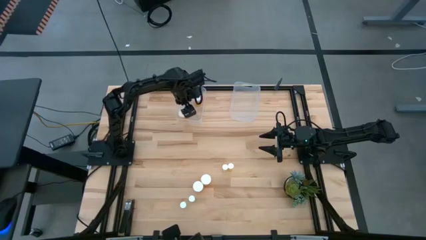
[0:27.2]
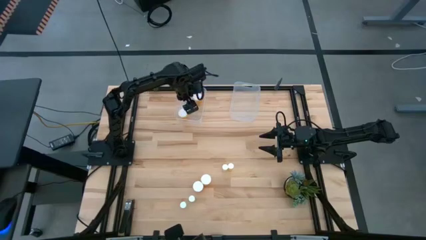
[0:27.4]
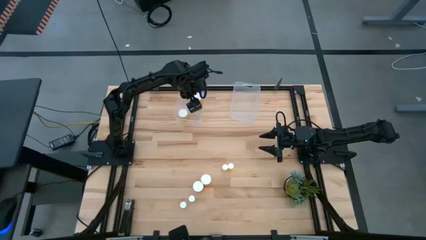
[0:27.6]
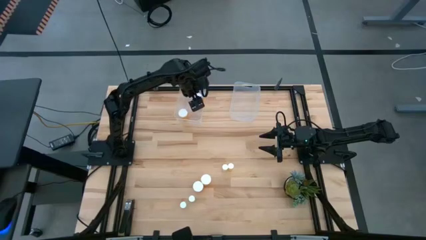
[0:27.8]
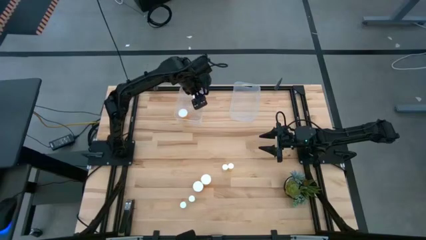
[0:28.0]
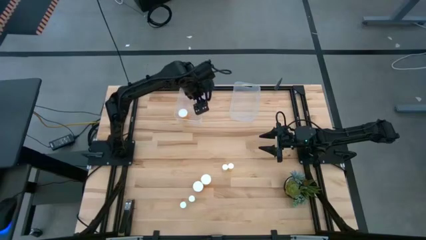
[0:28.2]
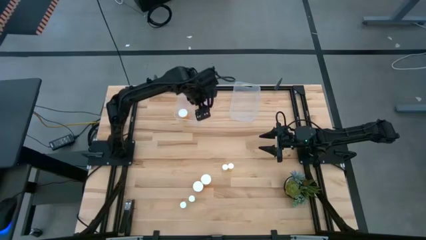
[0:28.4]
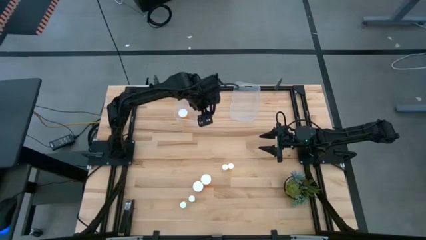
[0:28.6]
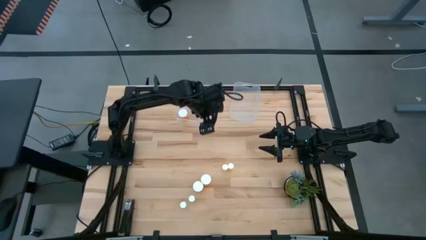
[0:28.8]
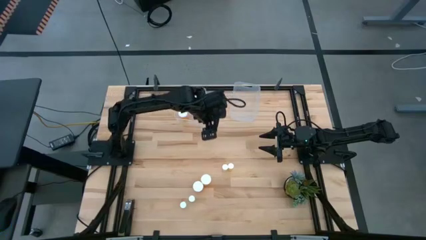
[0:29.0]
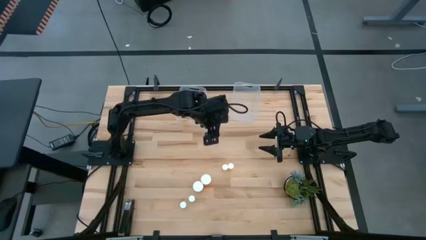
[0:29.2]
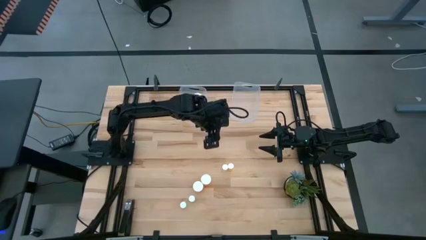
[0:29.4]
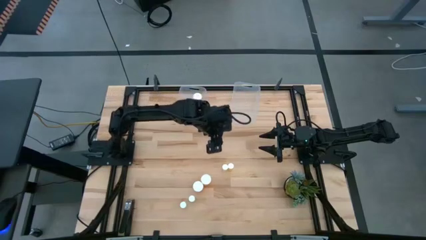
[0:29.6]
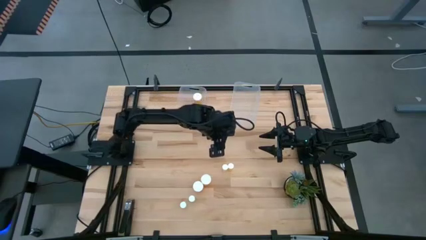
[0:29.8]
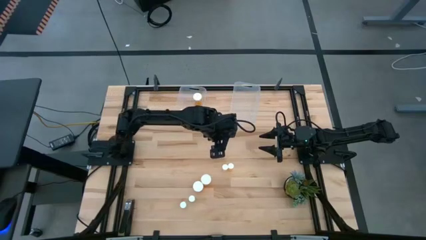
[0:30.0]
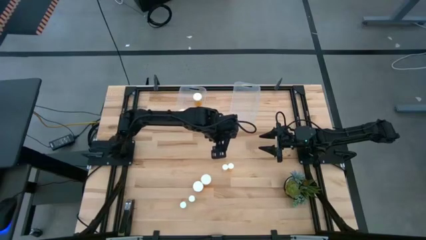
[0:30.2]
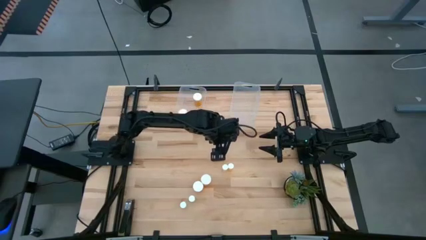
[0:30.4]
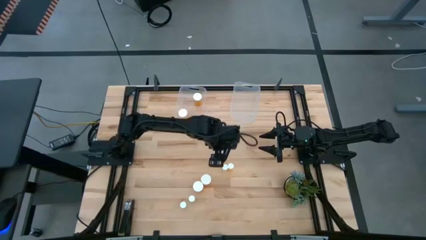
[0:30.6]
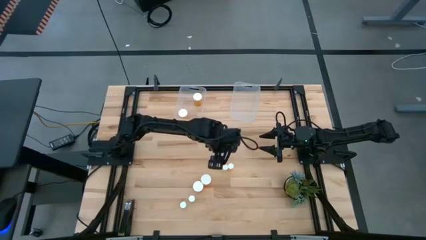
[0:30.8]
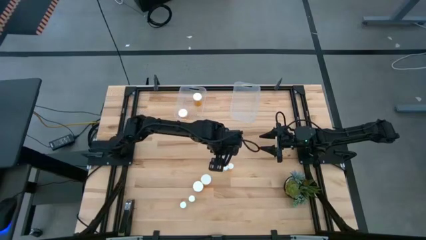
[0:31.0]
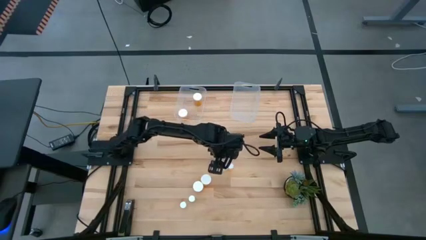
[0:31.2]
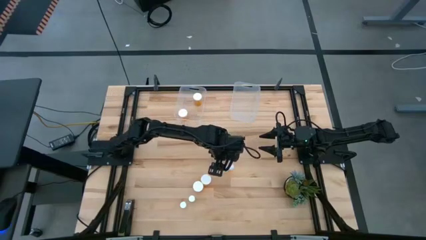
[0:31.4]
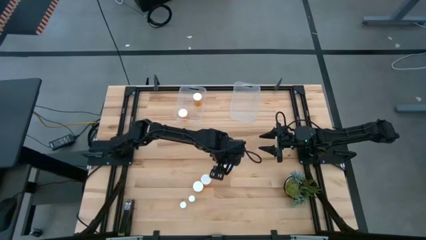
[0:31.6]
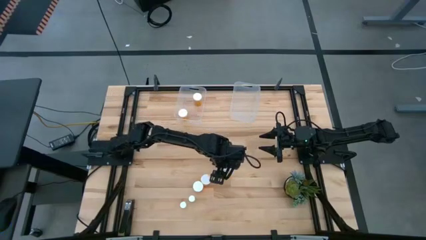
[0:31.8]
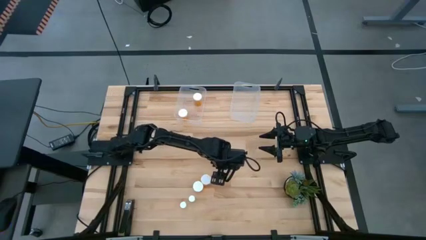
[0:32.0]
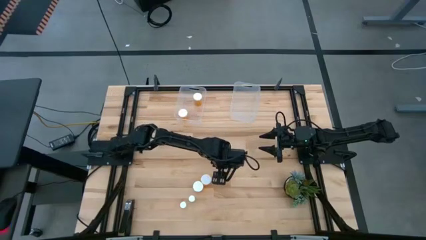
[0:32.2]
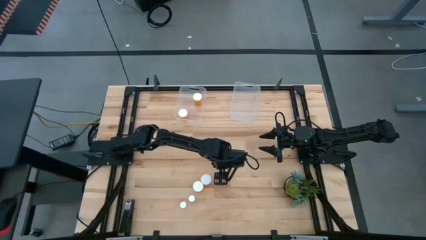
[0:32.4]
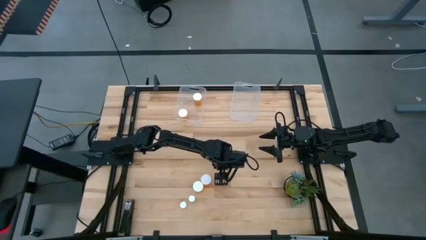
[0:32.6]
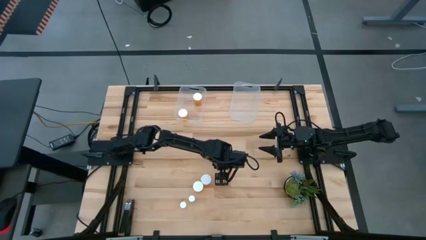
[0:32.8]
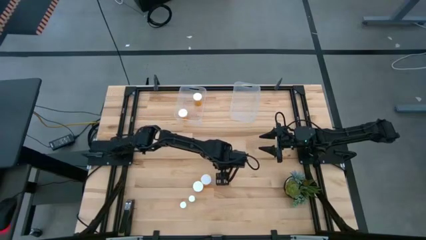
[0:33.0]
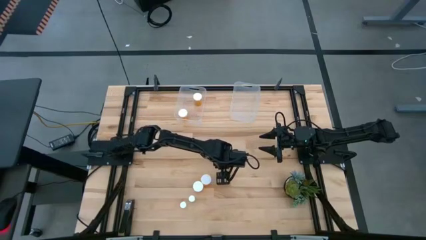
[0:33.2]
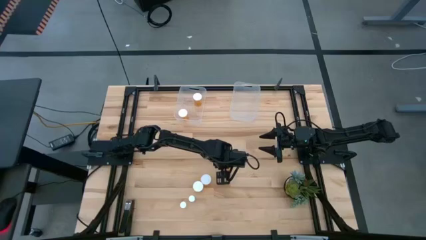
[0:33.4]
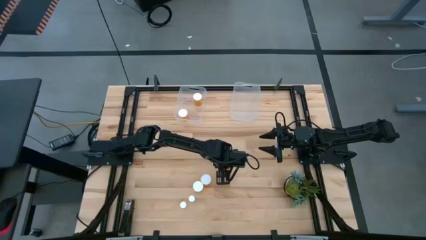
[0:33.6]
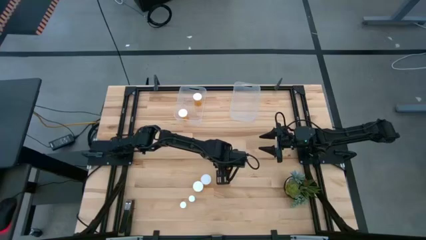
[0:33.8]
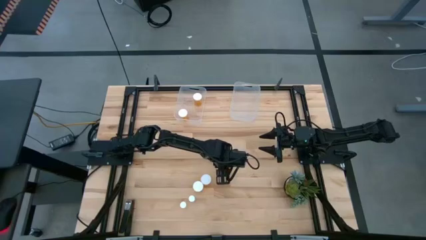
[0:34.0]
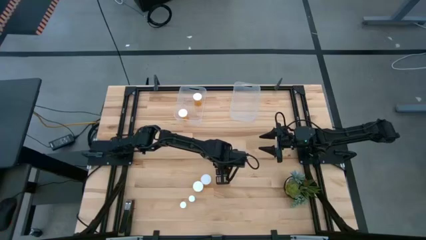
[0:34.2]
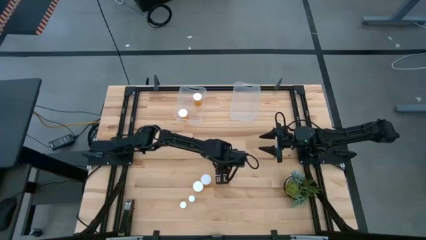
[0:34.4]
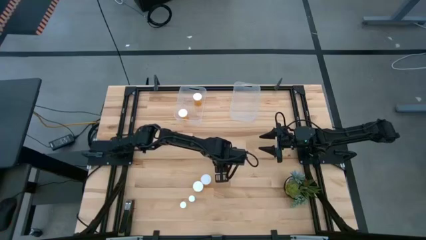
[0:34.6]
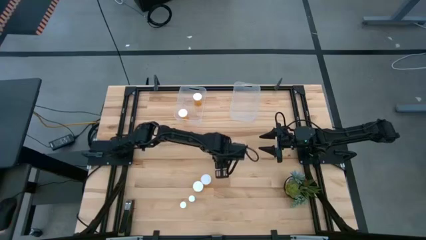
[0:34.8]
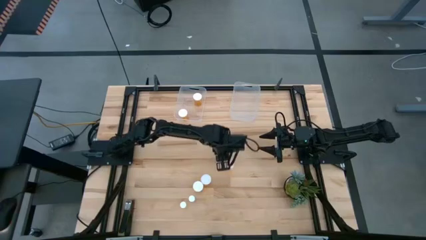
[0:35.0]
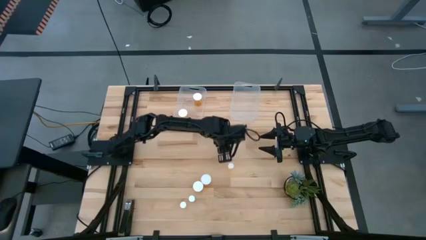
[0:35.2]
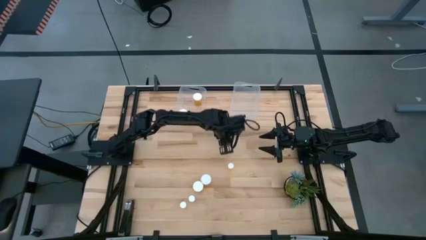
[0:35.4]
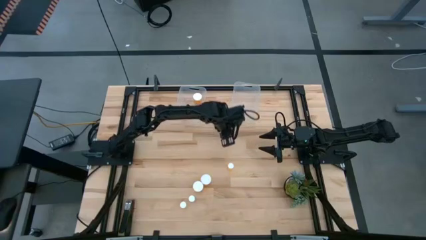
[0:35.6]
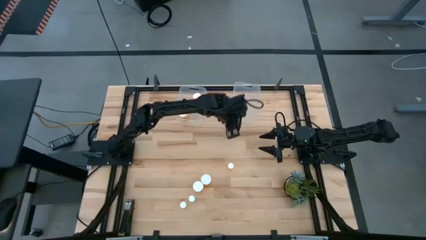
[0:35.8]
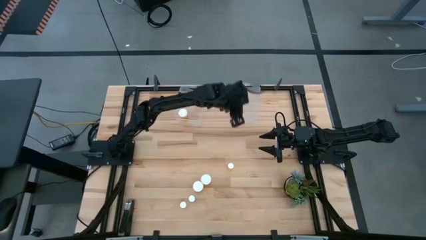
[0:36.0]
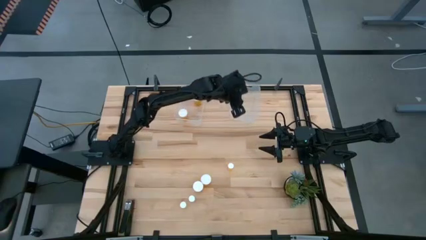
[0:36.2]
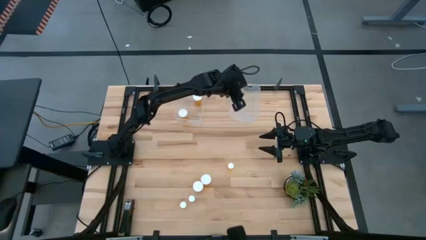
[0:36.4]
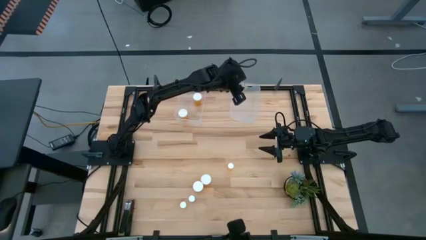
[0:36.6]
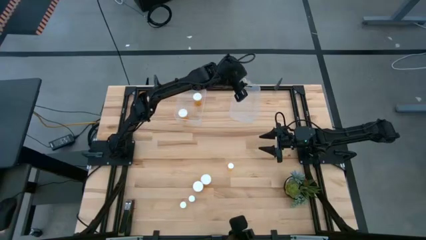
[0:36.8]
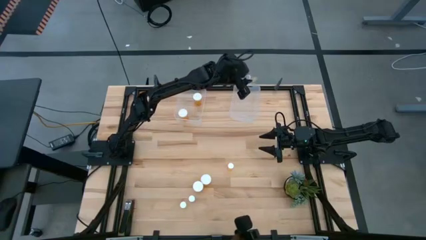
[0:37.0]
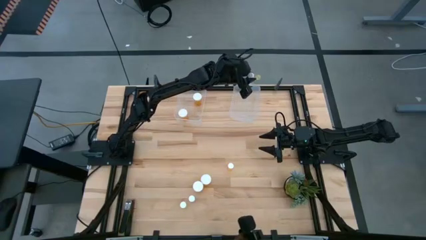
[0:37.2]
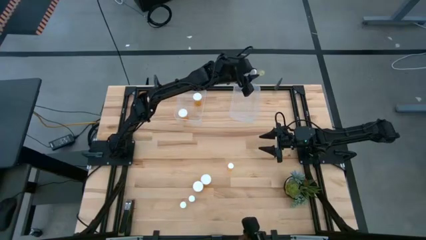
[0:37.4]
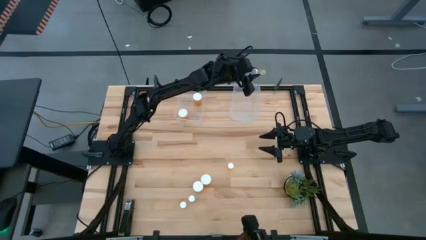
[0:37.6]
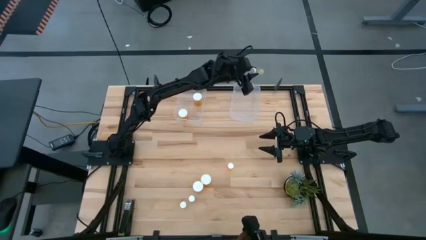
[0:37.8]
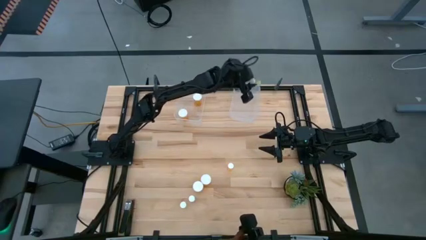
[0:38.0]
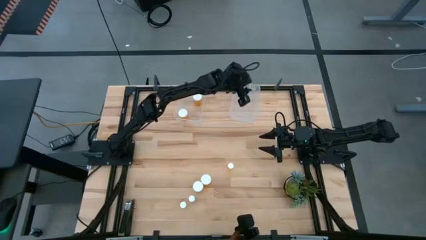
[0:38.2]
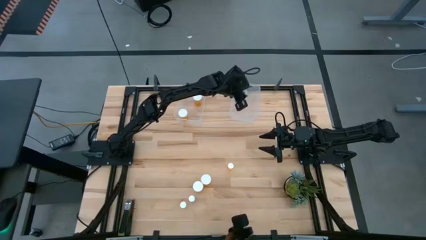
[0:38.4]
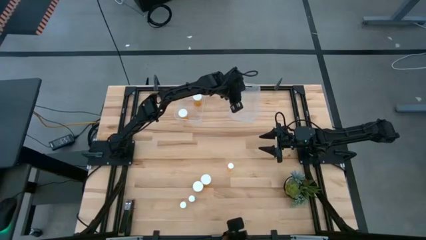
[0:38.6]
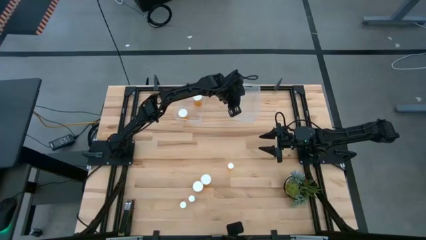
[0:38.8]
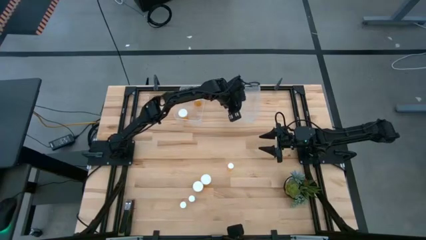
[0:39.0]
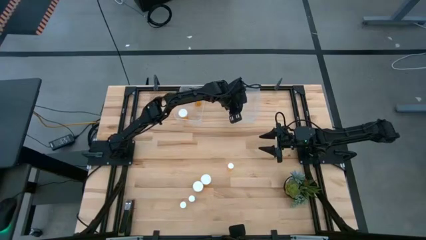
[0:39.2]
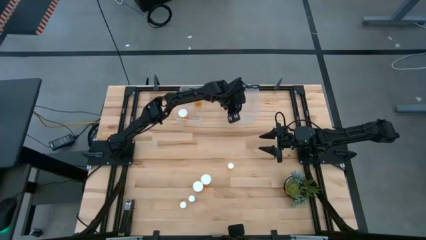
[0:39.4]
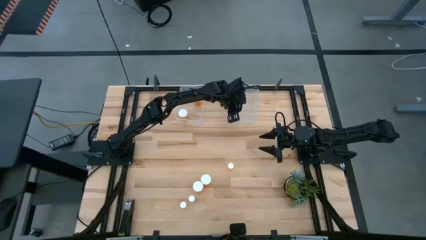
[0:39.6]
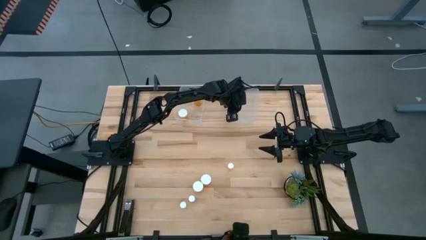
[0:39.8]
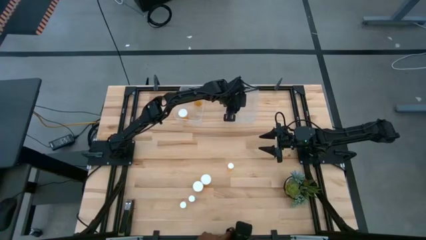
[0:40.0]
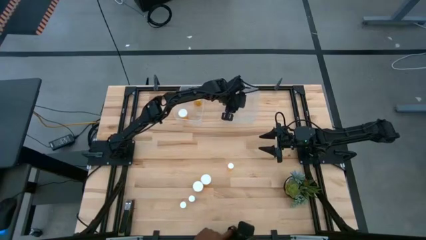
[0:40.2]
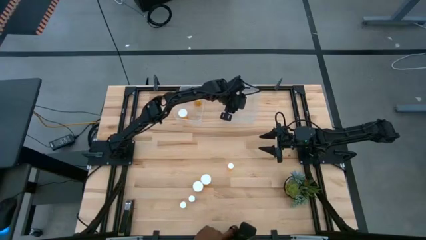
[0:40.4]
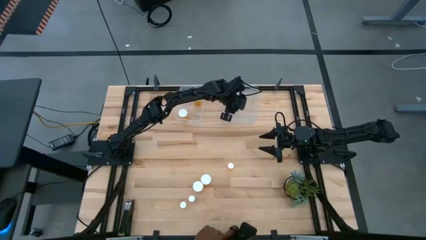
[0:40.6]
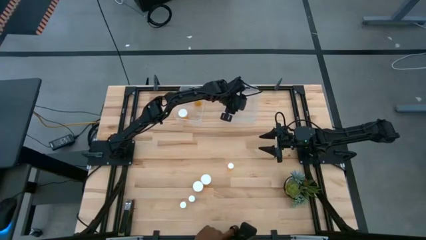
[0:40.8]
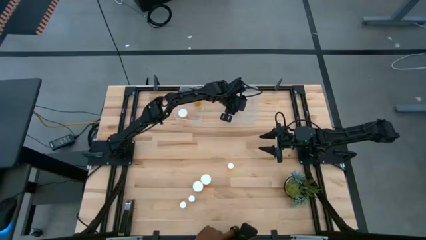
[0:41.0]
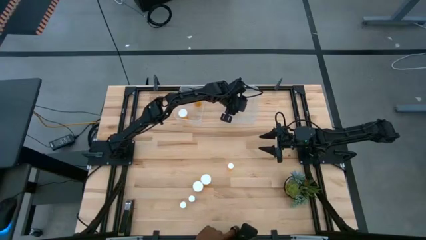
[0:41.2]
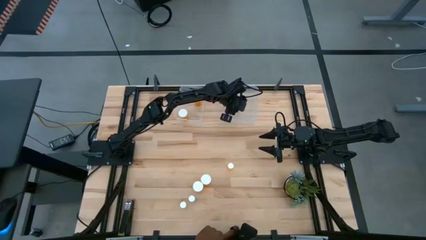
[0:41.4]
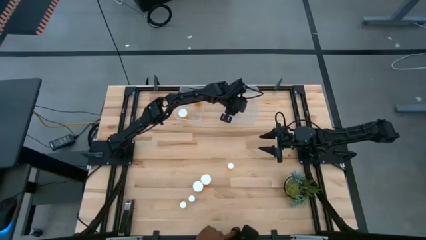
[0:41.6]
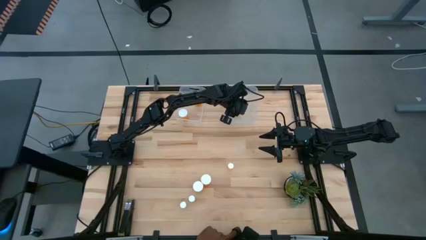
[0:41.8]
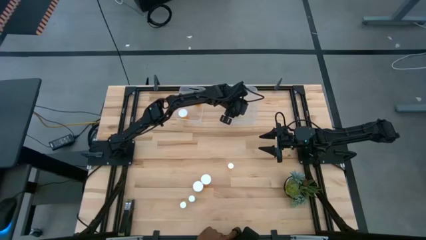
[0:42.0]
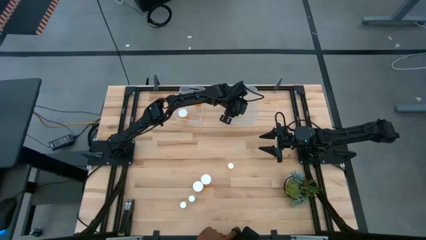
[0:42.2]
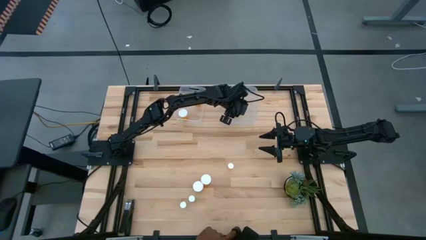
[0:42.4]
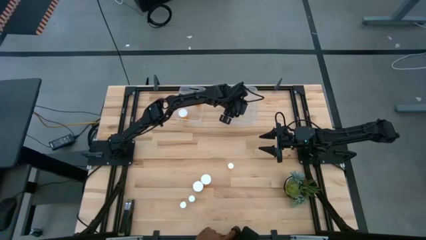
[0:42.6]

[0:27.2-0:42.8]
Task: Pick and place medicine bottles into bin by pill shape (circle, oval)
Put the small yellow pill bottle into the right transparent bin
